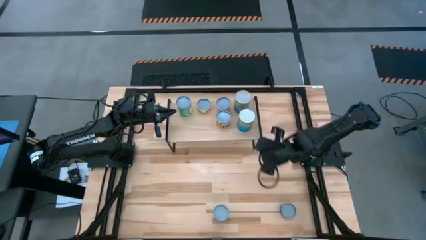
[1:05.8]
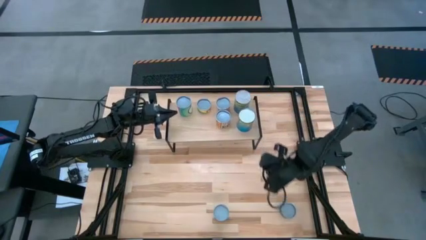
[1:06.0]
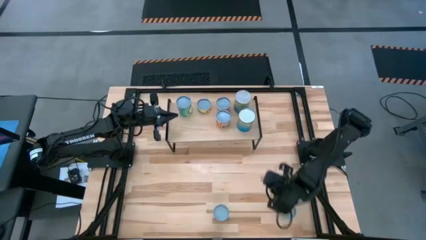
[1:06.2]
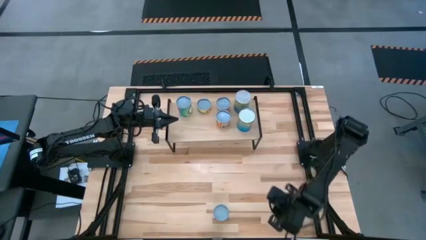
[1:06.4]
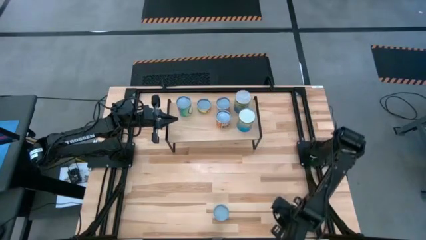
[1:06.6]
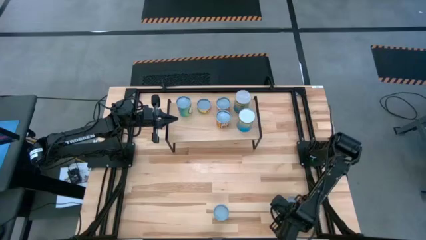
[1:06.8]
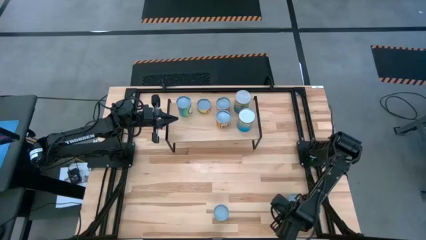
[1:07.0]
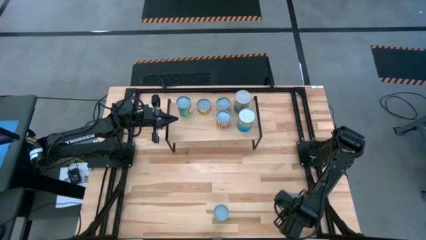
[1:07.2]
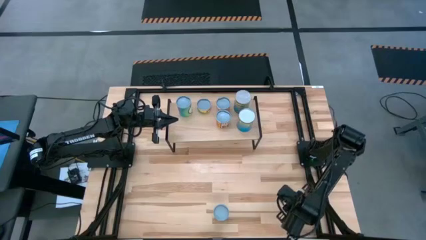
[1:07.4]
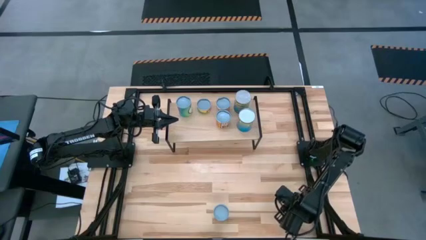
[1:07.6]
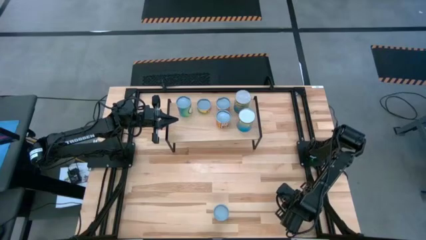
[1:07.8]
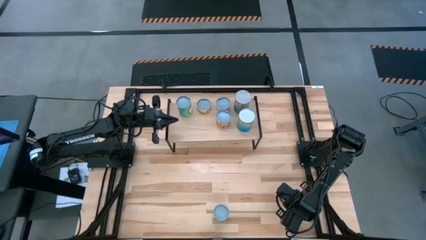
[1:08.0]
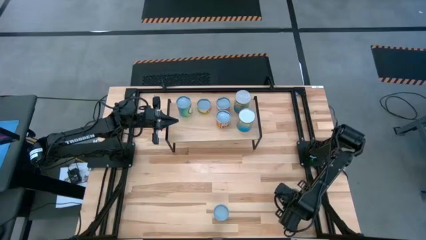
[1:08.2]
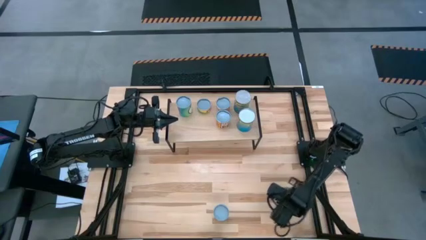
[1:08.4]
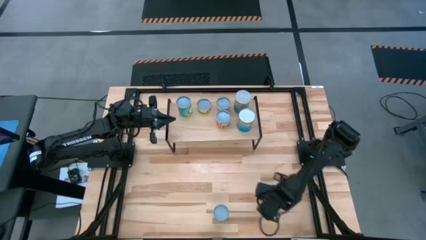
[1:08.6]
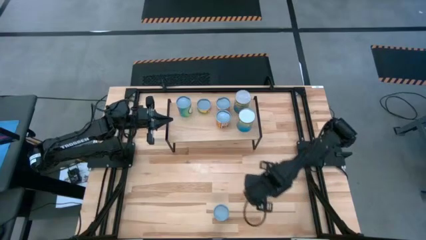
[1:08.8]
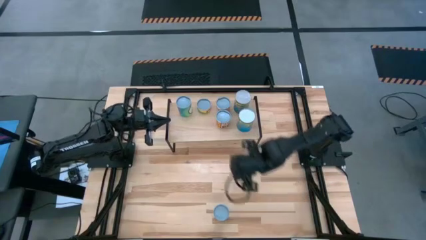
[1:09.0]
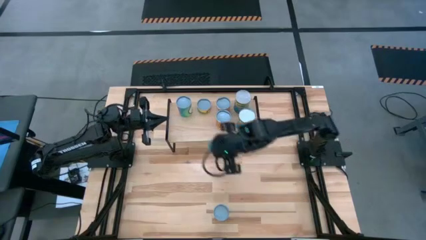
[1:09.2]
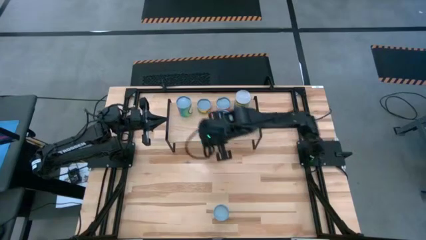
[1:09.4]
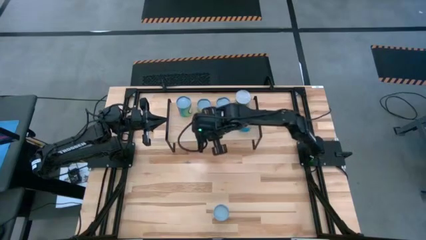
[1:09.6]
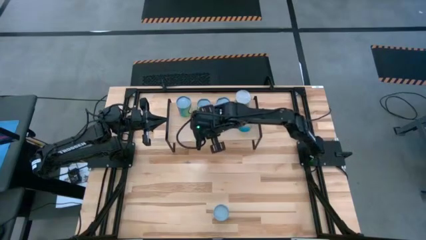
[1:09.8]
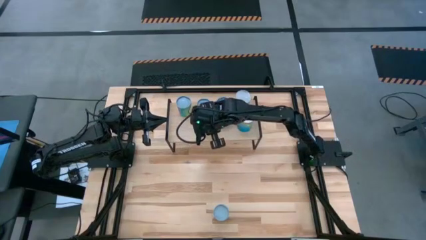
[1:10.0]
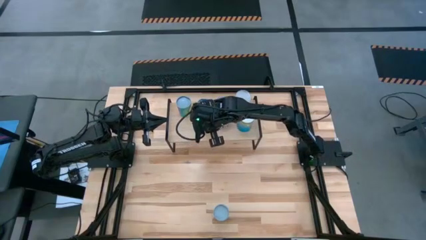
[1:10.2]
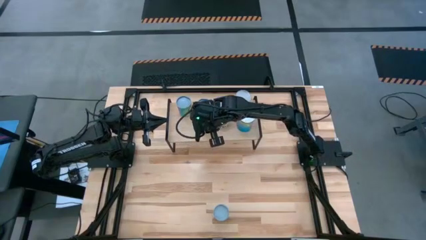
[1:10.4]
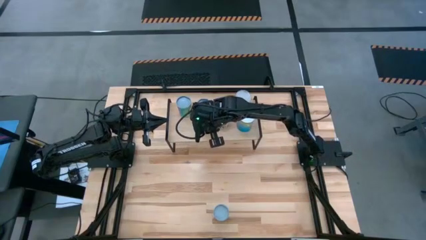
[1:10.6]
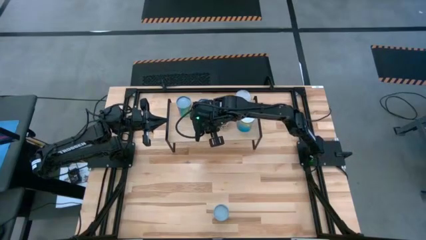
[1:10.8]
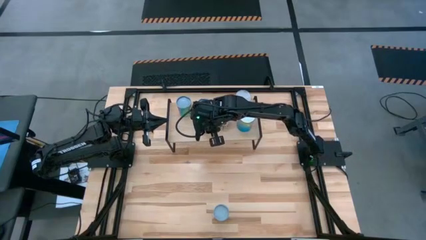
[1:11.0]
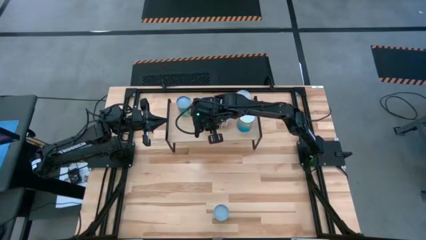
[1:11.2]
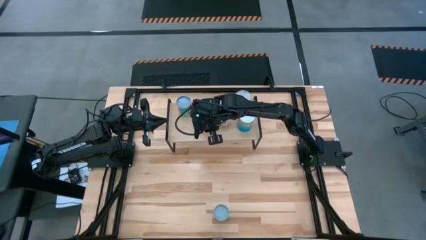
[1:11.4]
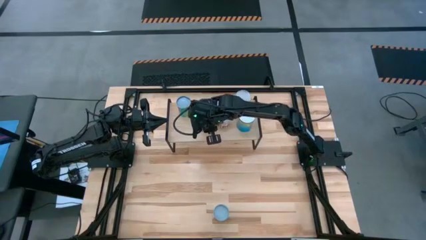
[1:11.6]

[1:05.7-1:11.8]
Task: Pick and place cans onto a shelf
Put the dark blue can on the shelf

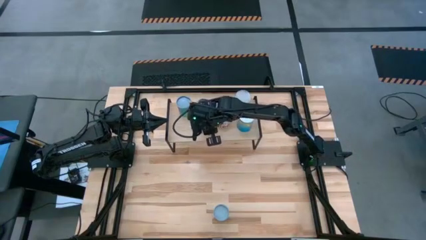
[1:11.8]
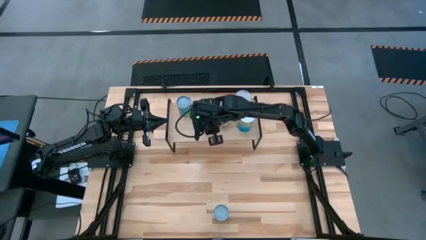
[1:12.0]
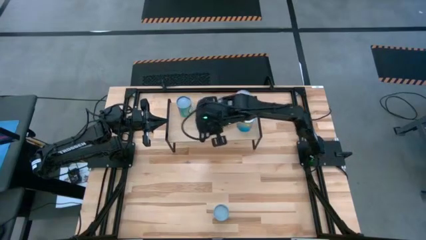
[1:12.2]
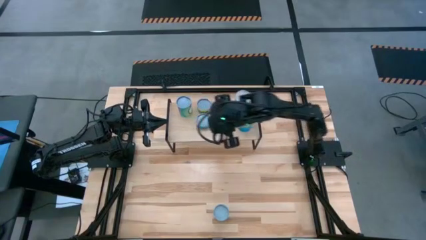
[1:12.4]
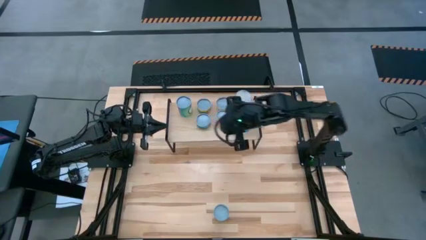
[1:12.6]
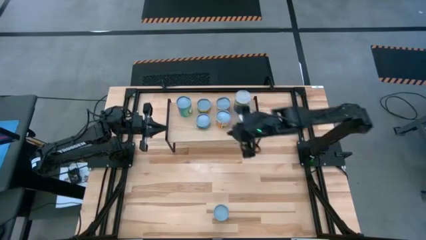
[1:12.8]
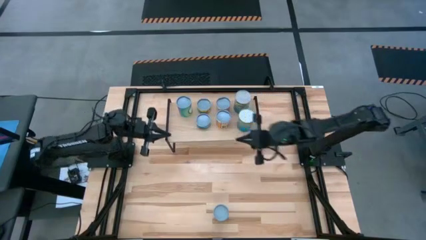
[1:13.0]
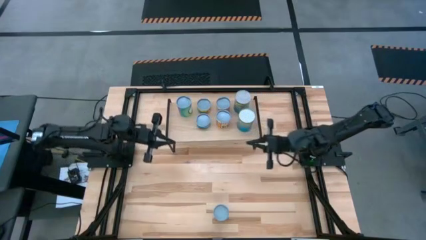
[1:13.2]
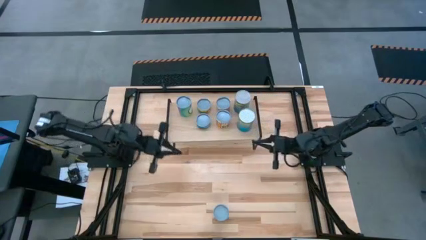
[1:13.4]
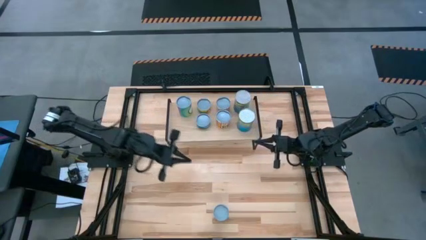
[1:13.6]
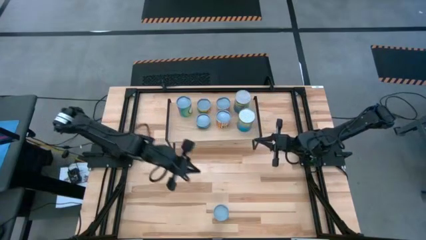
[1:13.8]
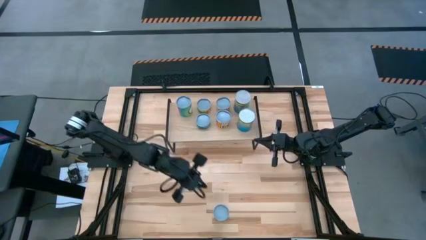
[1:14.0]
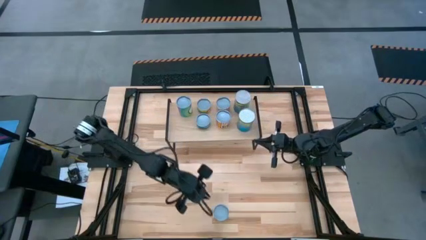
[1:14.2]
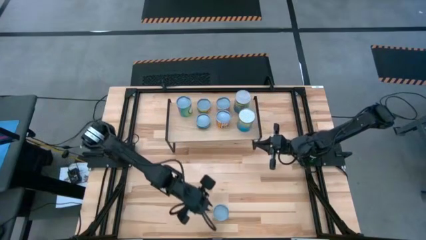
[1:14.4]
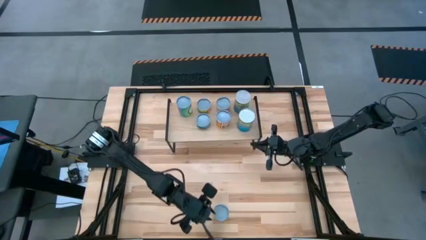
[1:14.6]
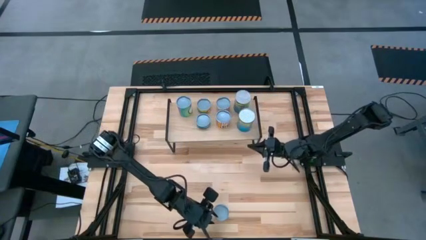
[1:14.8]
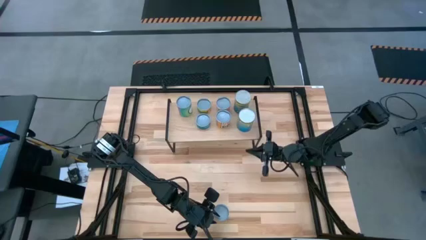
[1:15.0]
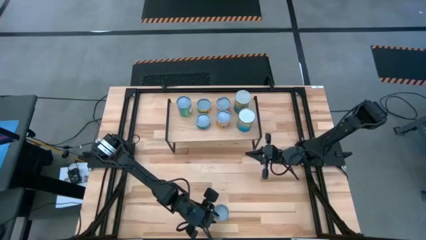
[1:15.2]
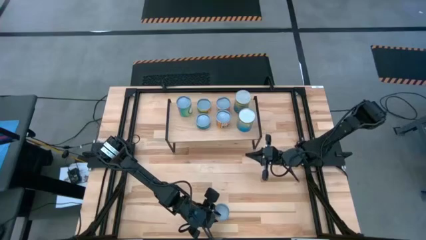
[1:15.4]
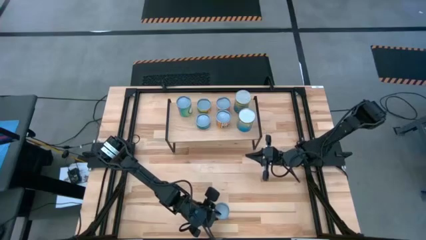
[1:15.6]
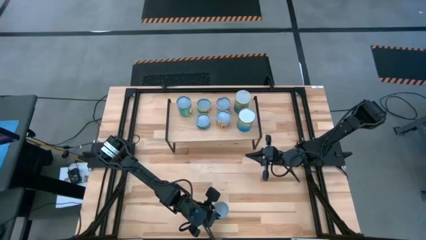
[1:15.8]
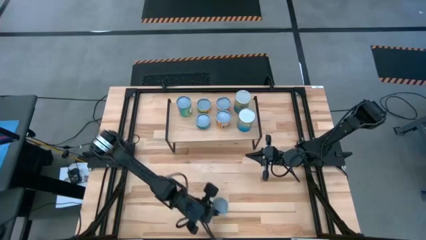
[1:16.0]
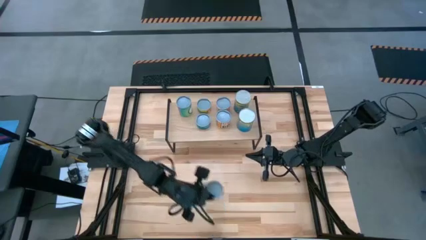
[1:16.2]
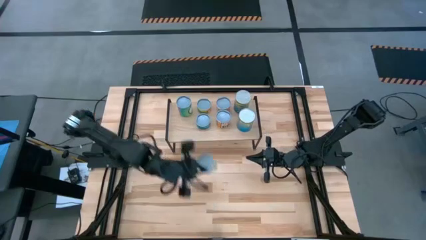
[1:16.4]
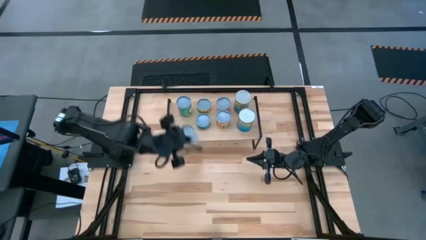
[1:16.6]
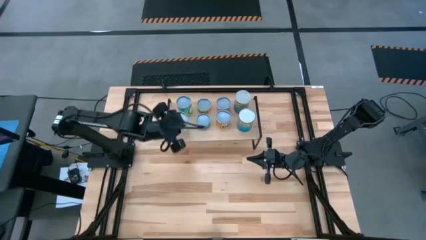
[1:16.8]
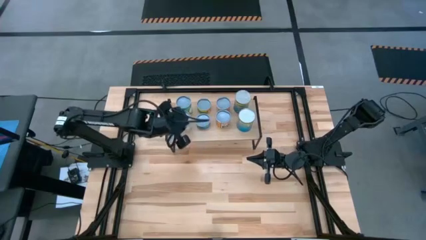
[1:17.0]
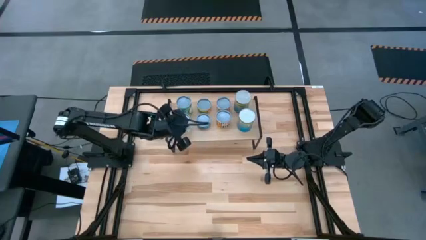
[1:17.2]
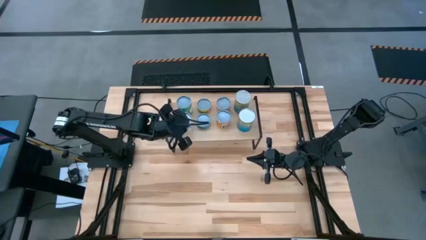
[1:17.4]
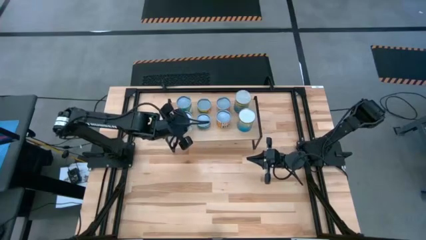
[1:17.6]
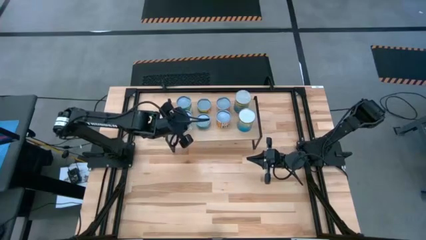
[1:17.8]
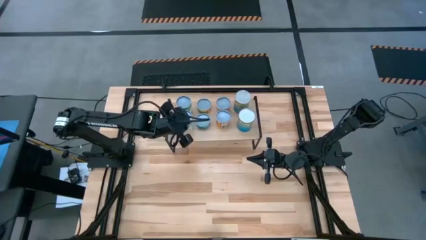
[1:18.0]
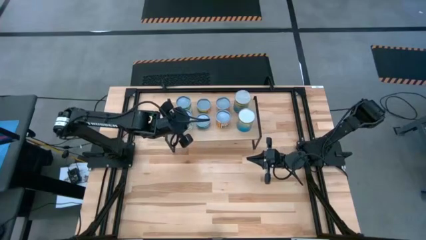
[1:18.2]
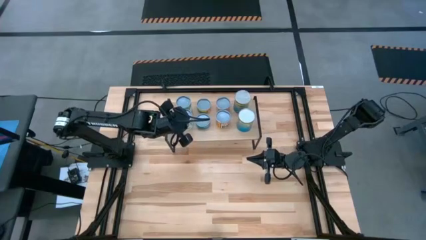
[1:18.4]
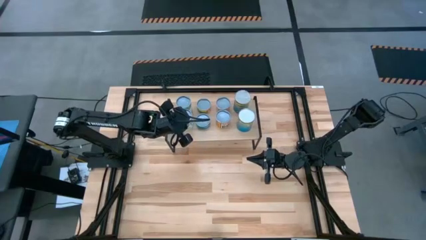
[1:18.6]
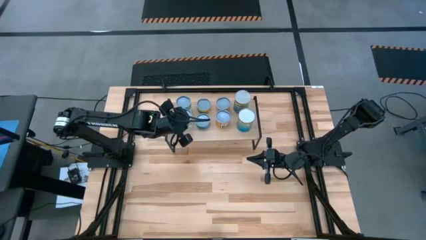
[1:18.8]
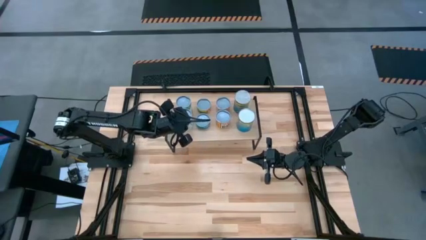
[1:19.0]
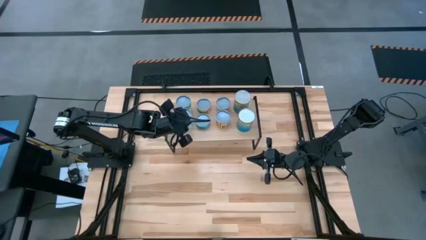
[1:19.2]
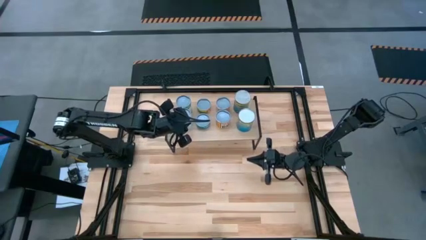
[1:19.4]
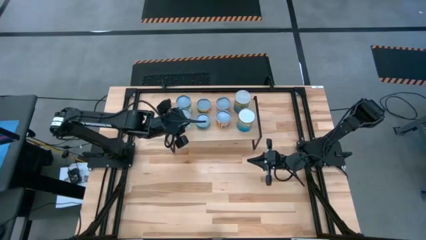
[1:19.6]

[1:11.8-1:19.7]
Put the white can on the shelf

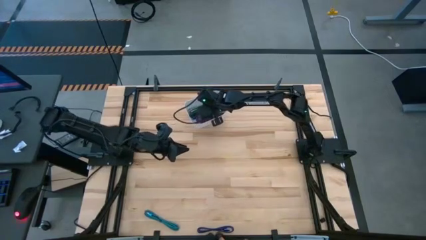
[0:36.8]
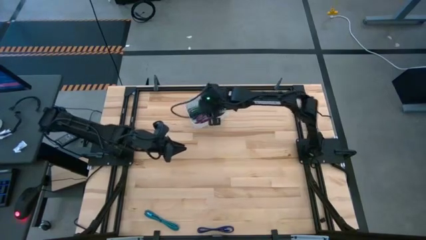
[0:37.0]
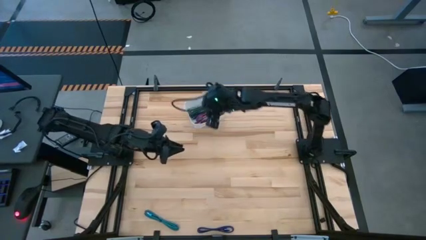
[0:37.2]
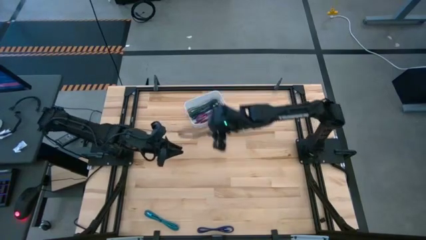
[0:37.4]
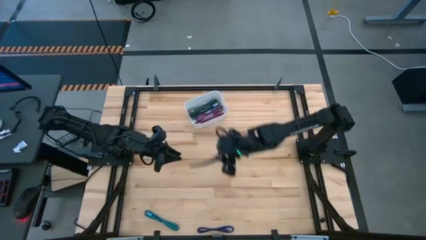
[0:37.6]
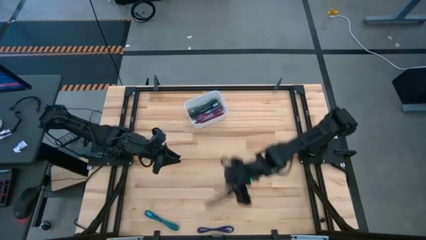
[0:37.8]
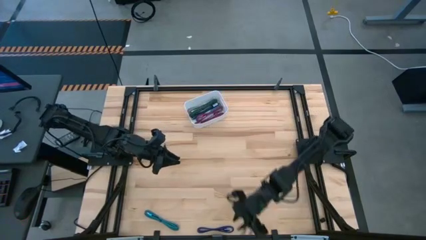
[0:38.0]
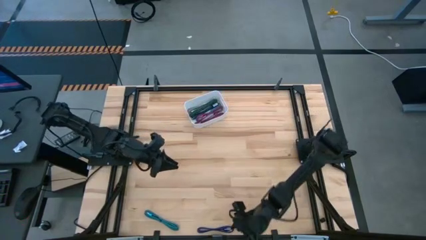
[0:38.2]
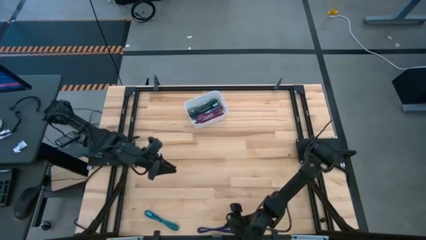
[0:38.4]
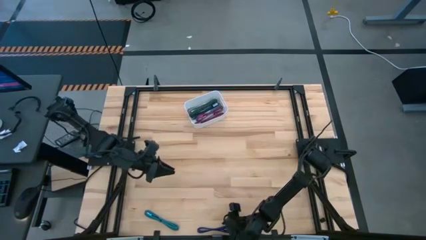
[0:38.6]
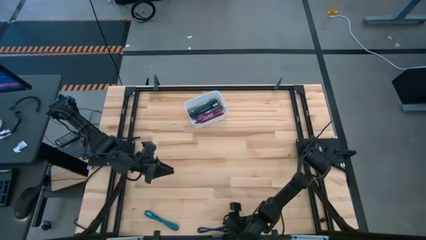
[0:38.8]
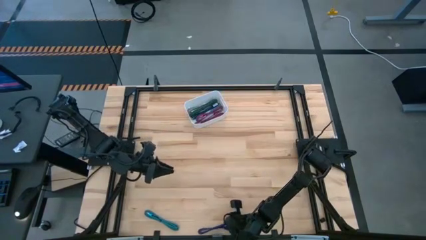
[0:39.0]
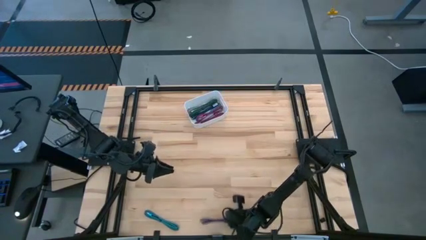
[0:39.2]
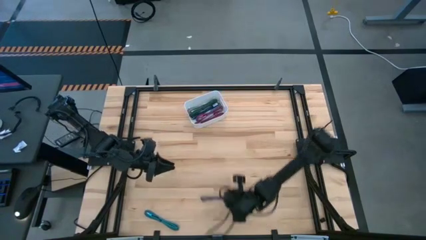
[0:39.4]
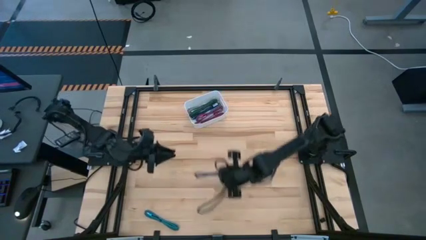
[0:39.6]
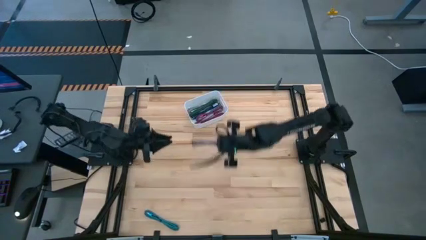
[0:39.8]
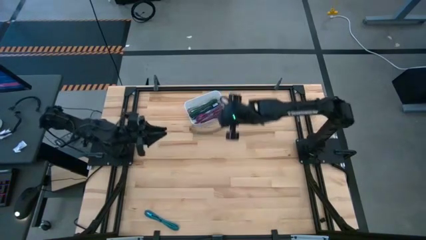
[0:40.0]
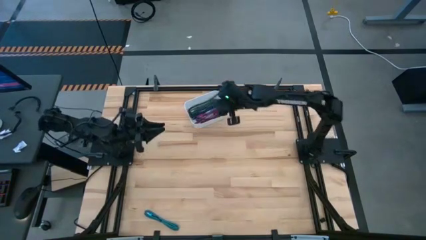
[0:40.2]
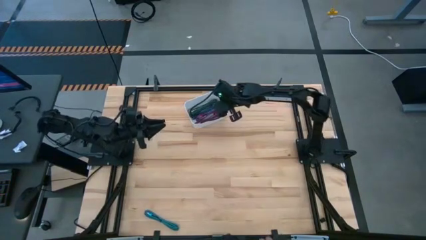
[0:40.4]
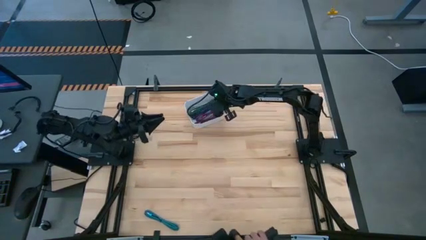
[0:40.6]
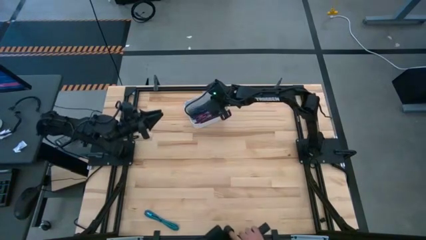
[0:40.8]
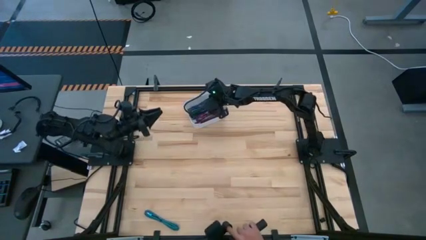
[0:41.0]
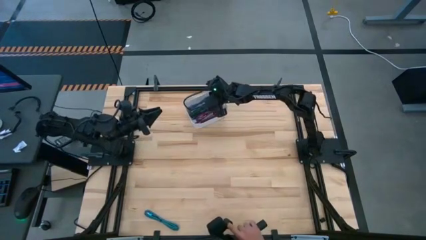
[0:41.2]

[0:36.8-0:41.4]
Task: Pick and place USB-C Cables
Put the black violet charger cable into the white bin
